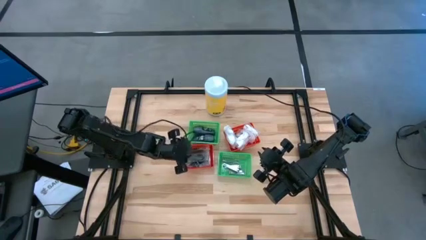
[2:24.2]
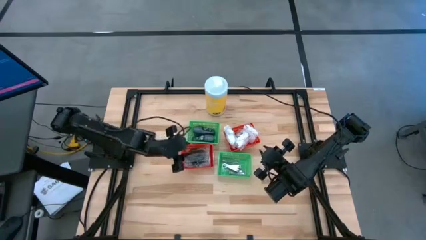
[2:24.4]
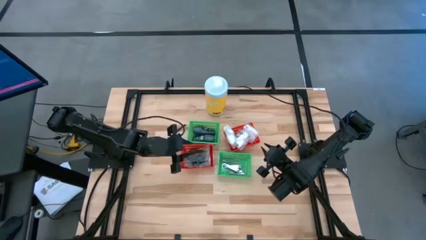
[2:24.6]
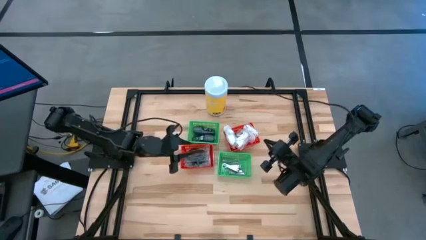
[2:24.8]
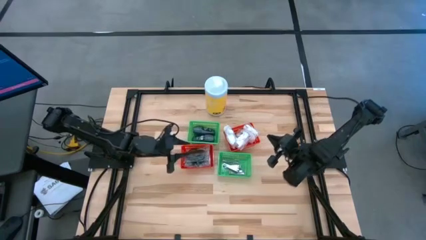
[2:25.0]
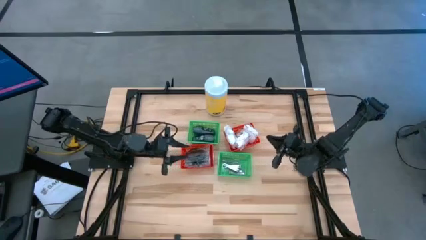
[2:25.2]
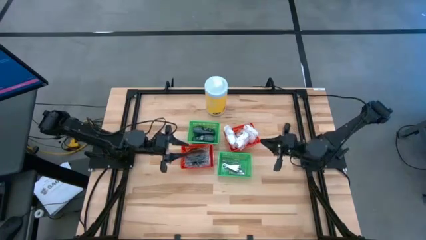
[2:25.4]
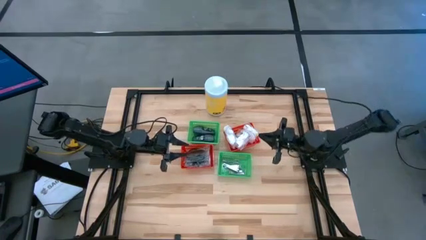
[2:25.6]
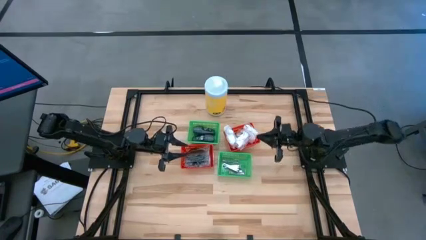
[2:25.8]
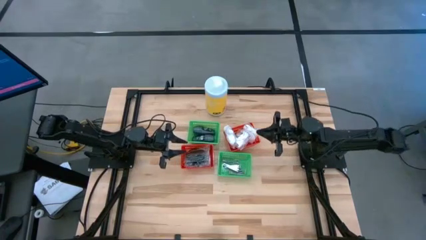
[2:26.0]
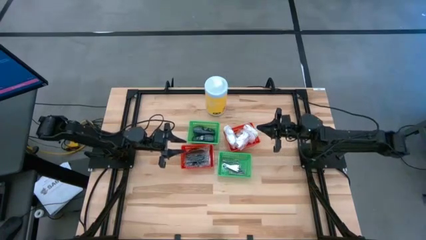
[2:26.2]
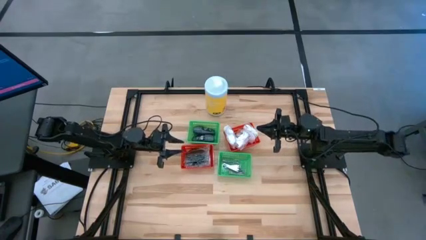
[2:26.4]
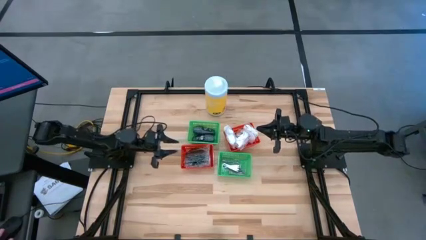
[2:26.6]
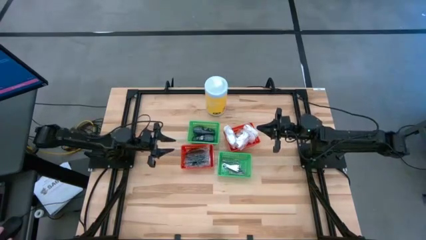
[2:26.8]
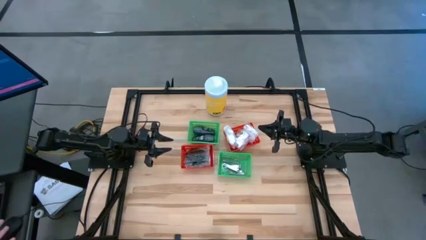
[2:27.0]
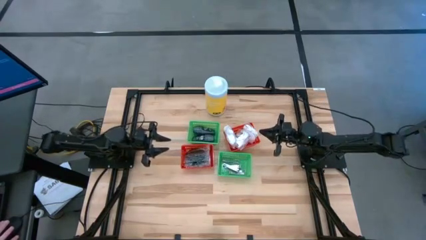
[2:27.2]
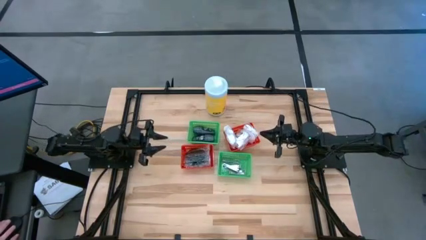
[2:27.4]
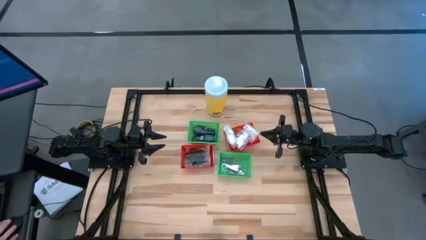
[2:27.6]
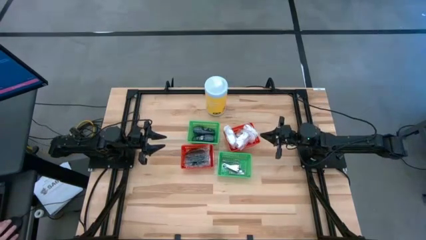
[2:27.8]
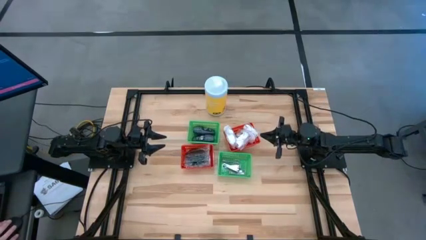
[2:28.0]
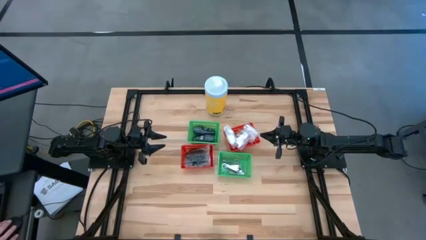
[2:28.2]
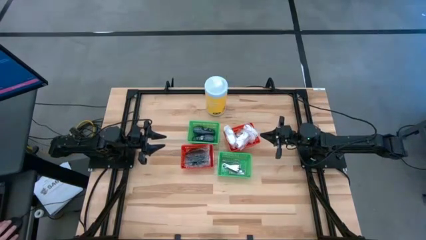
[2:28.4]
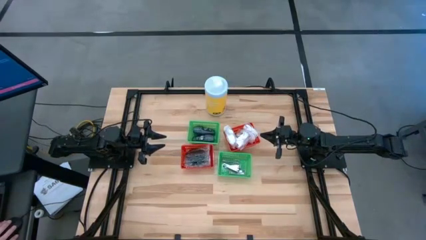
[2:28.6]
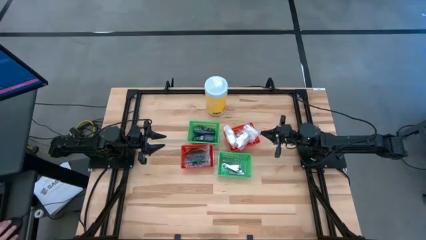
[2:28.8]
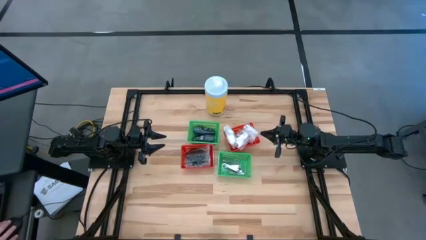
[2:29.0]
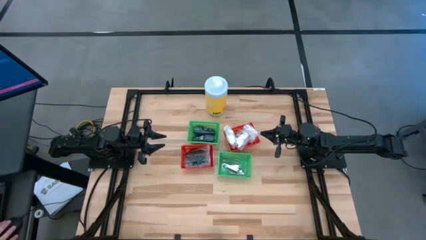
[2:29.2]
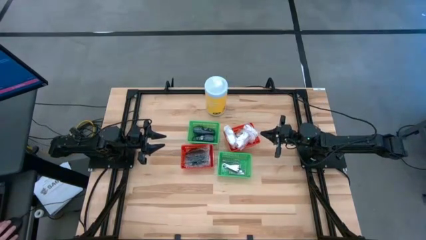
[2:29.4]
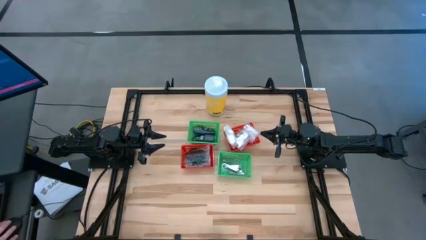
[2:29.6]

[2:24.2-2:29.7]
Task: Pick & Place Travel size toiletries
Return to Home Position

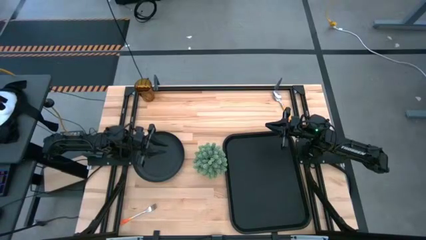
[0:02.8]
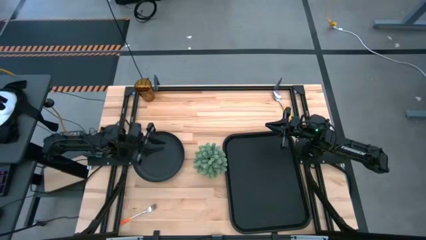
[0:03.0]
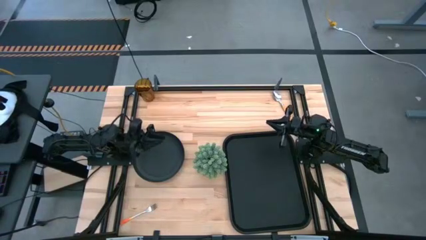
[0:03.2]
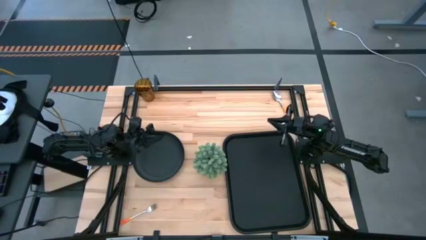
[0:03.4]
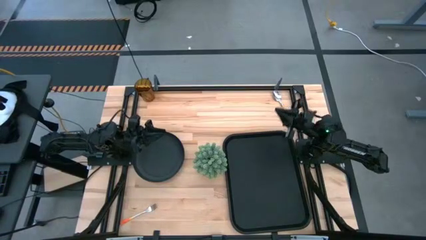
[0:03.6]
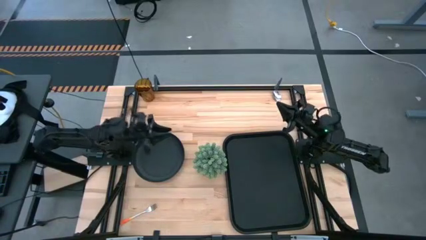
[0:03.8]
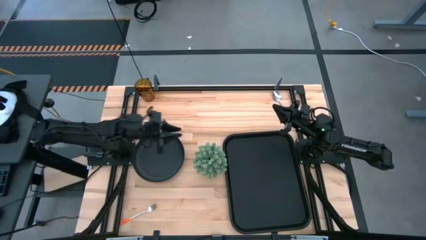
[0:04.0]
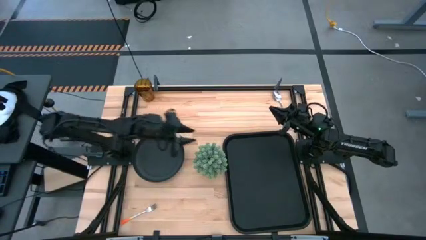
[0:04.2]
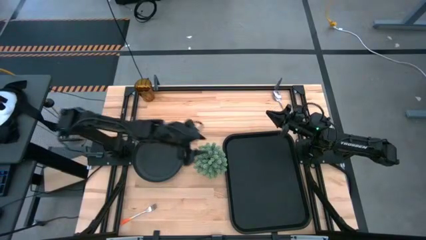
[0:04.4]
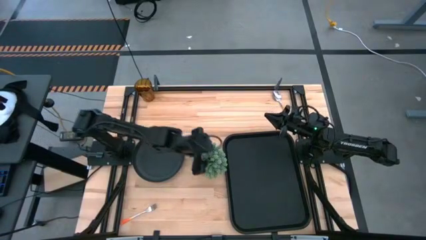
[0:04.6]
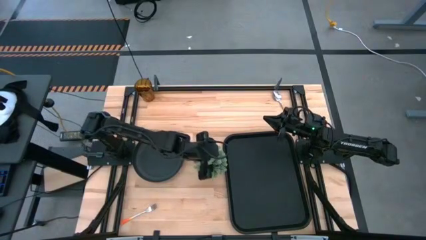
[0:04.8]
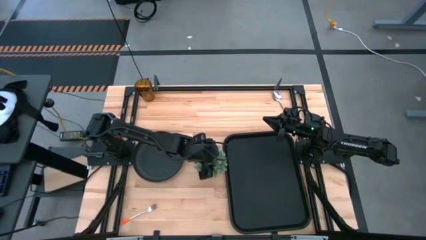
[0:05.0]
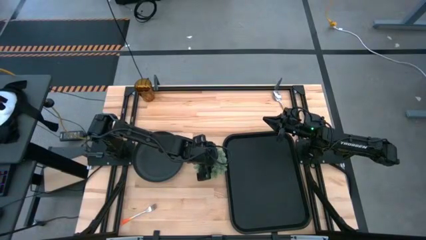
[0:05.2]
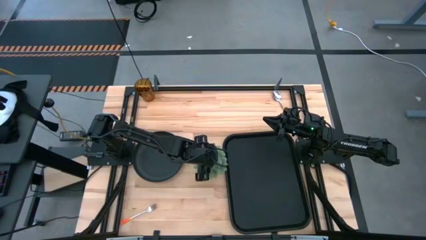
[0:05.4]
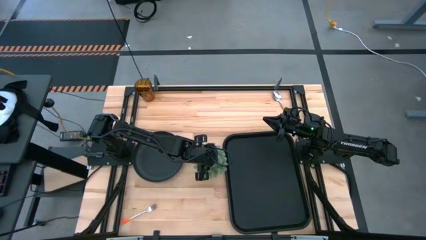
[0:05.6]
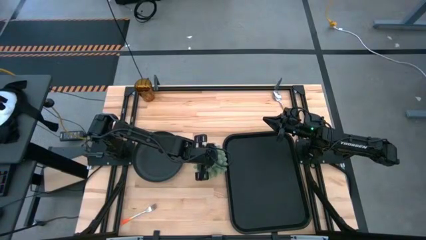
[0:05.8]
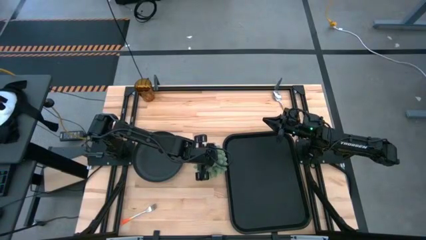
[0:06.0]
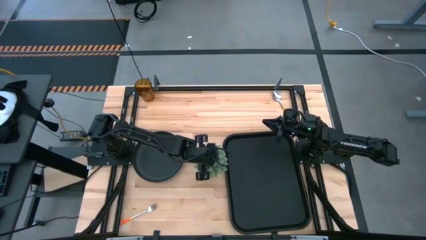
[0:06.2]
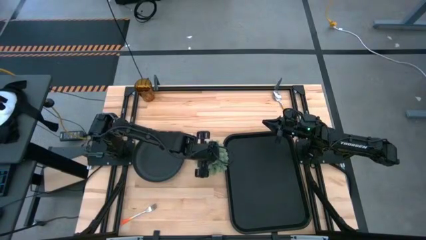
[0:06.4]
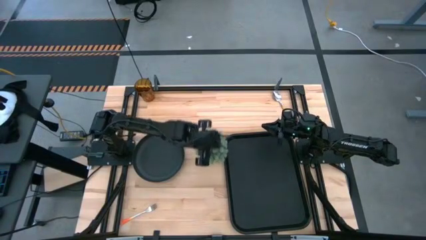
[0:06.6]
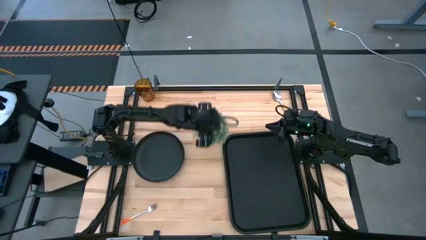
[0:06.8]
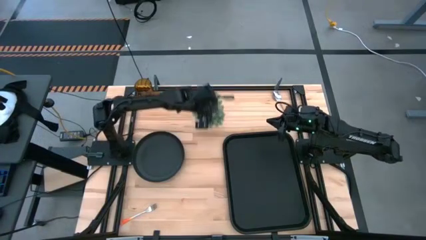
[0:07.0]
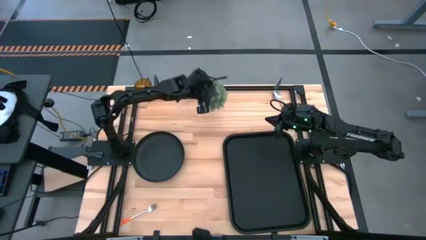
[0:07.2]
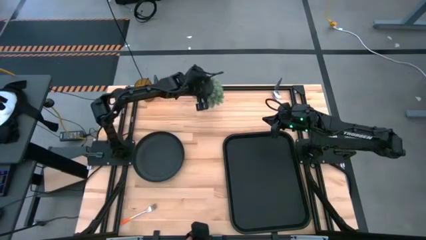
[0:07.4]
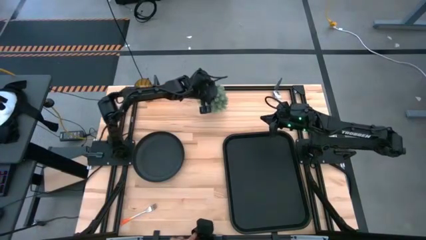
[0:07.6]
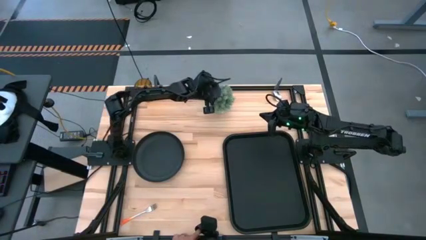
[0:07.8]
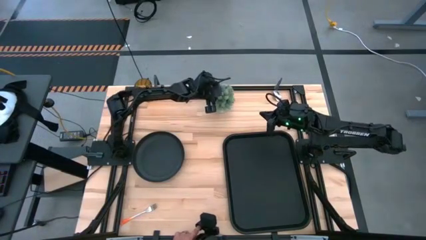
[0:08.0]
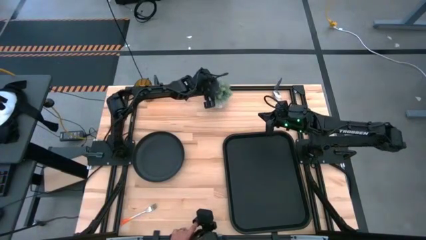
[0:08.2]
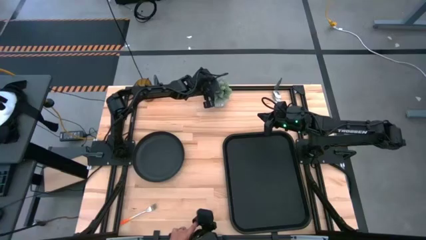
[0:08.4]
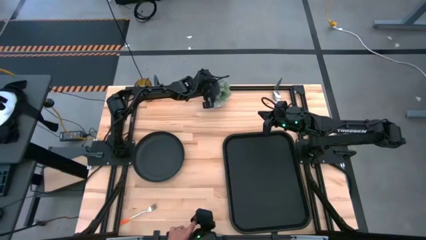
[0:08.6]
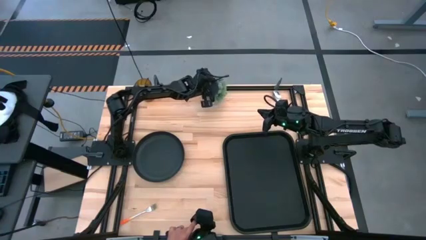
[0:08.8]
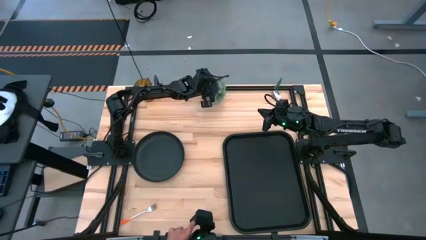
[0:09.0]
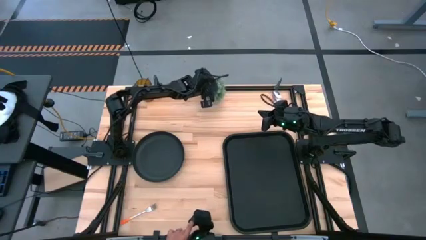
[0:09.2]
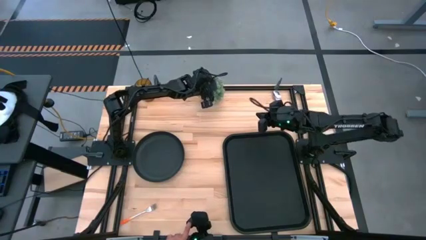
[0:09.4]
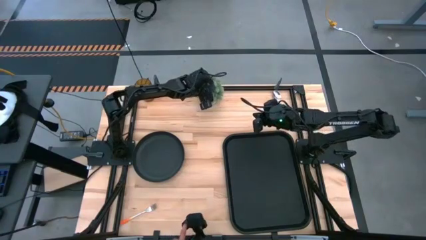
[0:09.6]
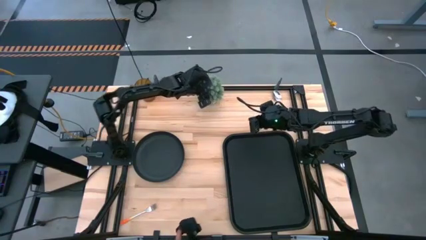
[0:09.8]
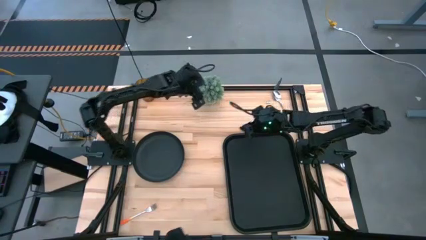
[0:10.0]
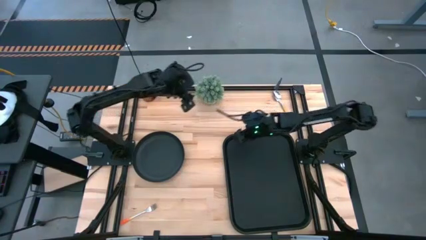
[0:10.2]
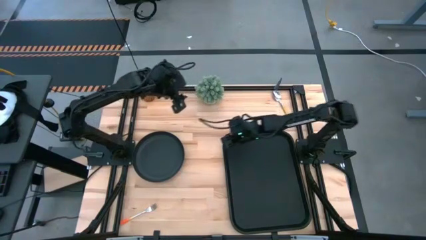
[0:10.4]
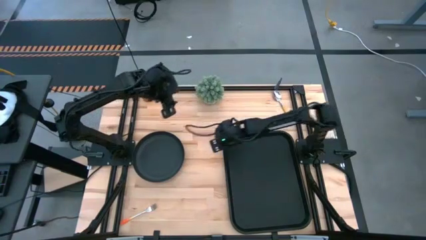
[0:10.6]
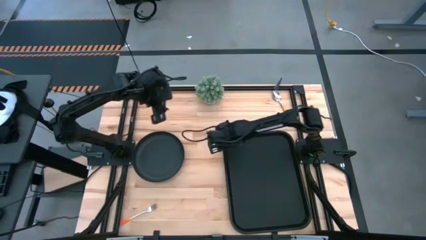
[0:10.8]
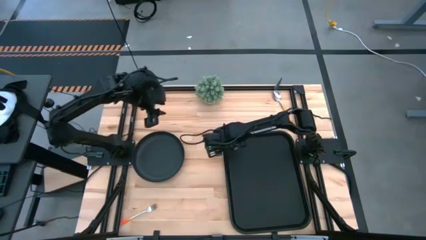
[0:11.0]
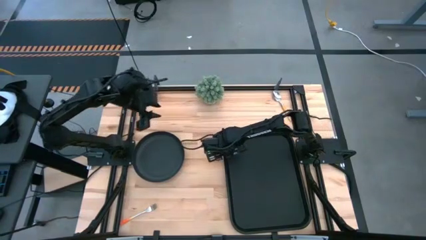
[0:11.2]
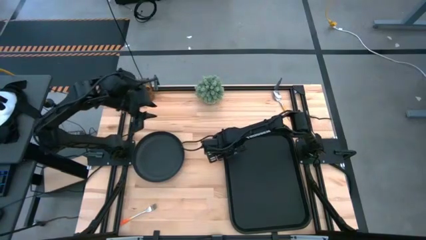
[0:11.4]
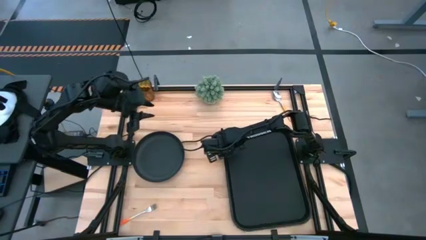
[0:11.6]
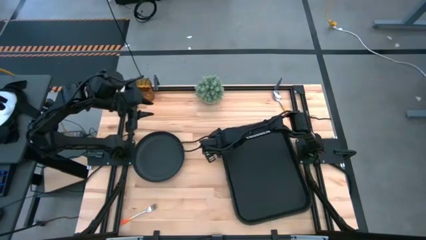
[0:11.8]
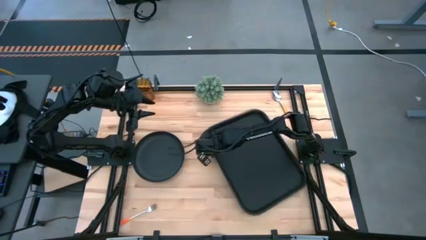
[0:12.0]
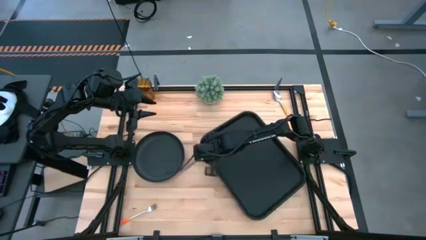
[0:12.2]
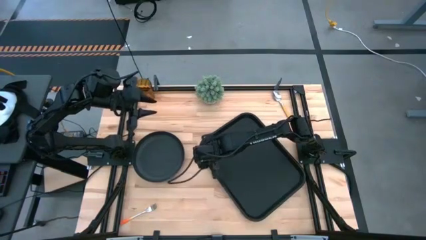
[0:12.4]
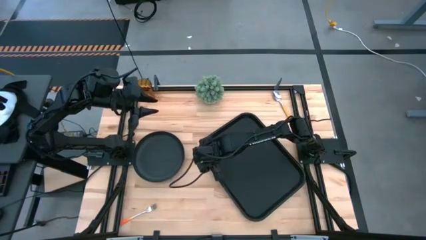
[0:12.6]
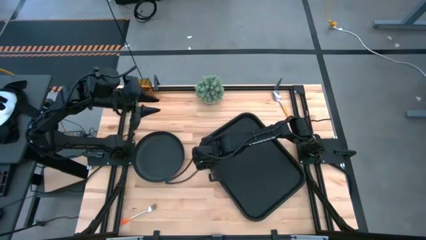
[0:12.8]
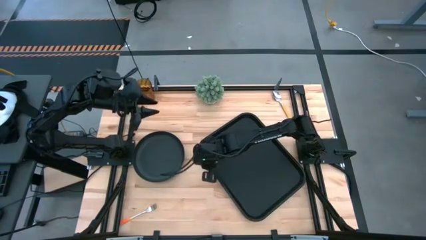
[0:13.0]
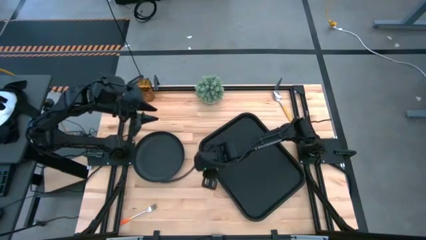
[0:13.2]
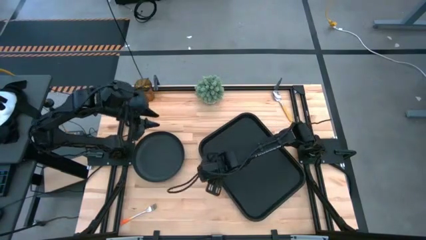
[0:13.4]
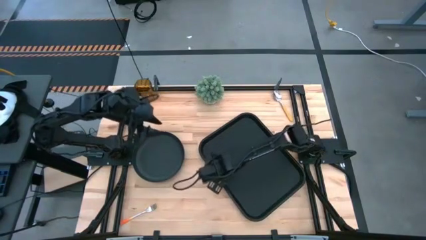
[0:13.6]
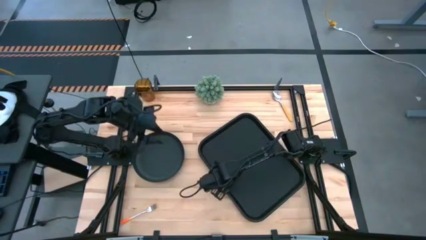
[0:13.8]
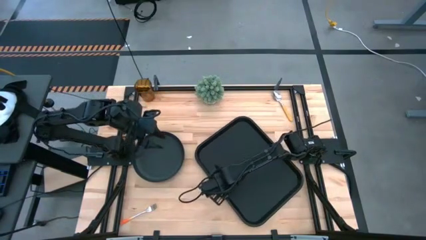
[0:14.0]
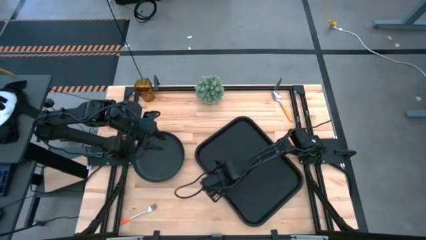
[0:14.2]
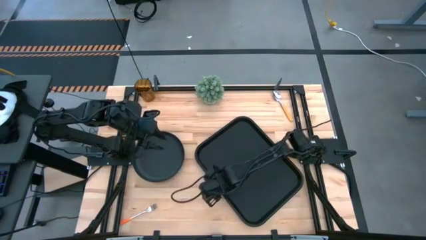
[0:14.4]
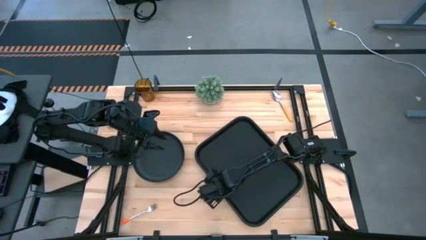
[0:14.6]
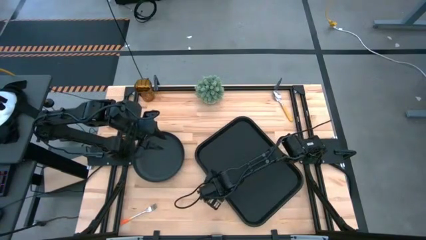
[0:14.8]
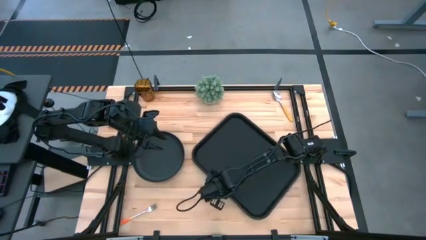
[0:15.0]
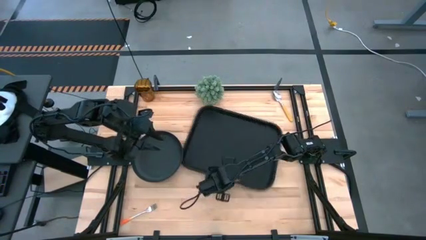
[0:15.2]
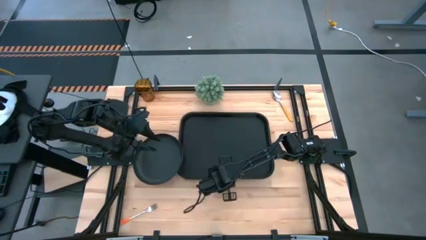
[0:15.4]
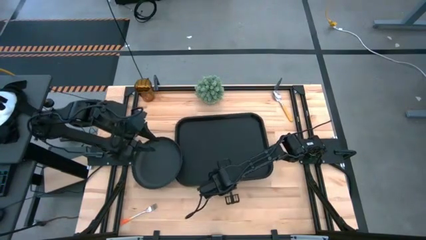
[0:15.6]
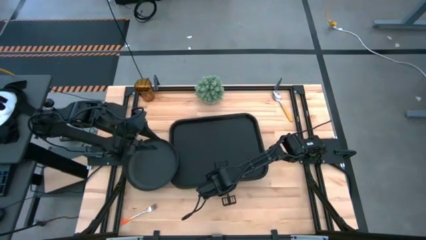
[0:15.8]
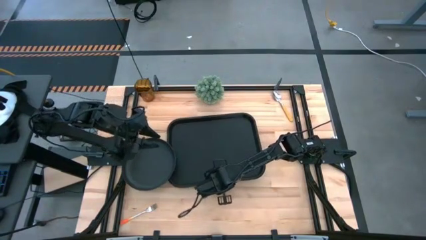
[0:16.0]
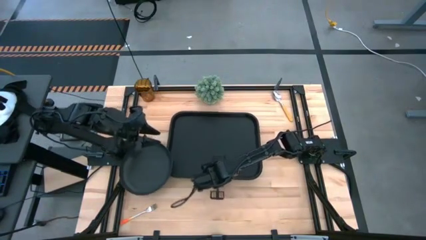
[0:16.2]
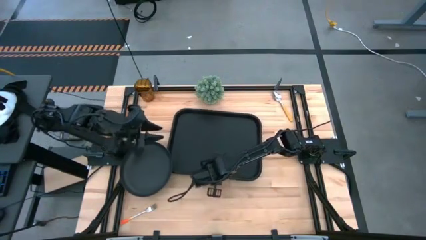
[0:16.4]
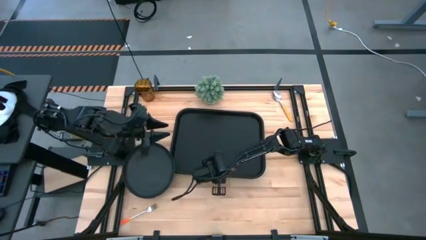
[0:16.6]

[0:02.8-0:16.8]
Task: Pick and place plate/cup/fork/spoon on tray
Prepare the black serving tray
